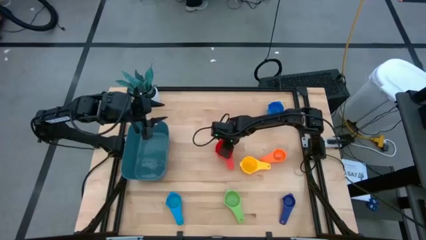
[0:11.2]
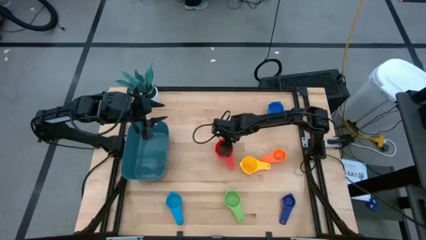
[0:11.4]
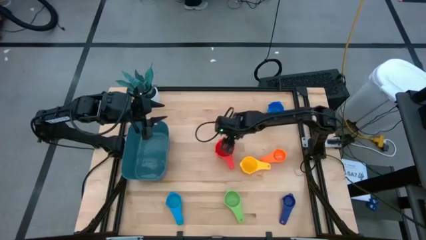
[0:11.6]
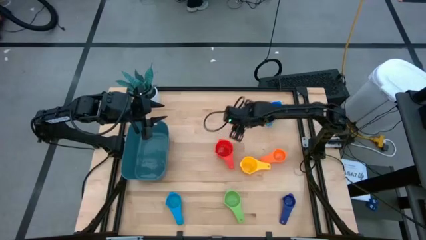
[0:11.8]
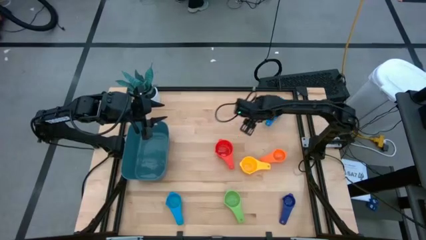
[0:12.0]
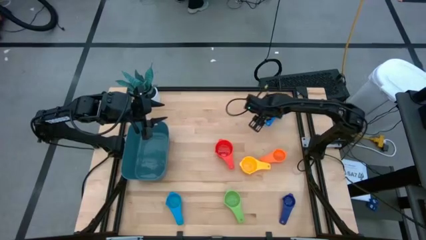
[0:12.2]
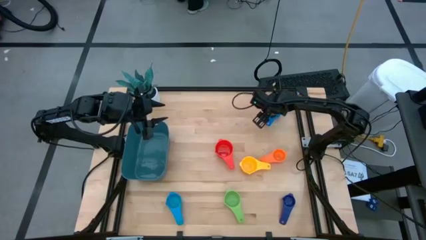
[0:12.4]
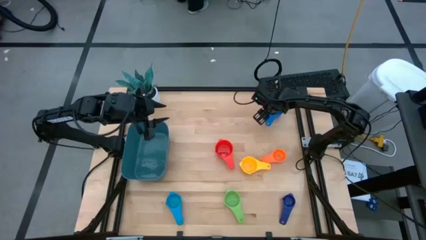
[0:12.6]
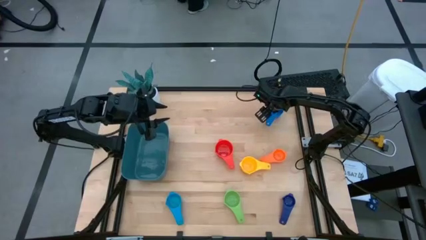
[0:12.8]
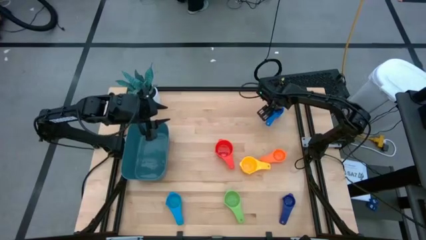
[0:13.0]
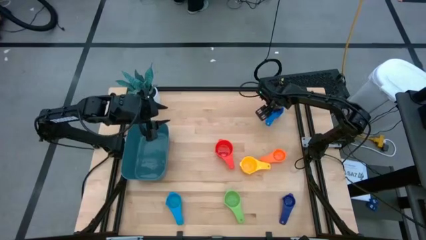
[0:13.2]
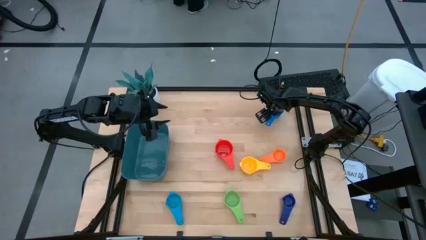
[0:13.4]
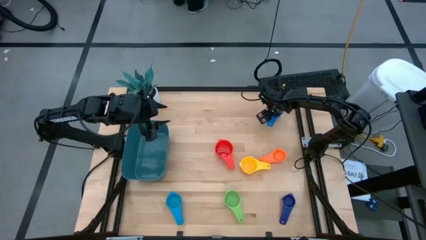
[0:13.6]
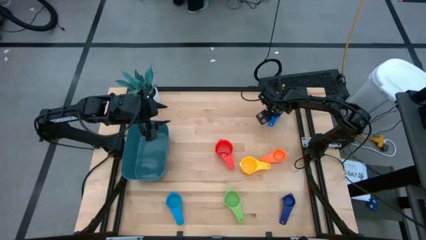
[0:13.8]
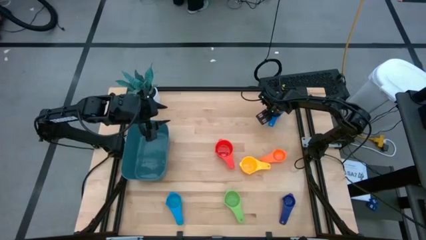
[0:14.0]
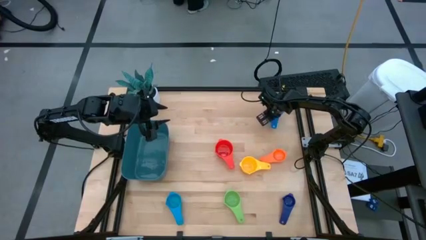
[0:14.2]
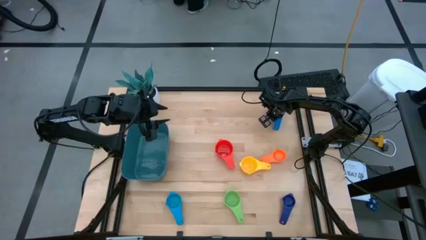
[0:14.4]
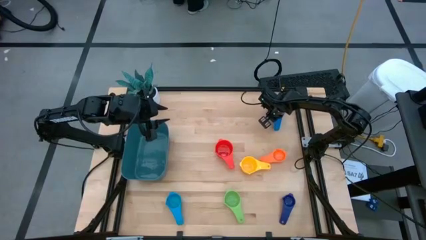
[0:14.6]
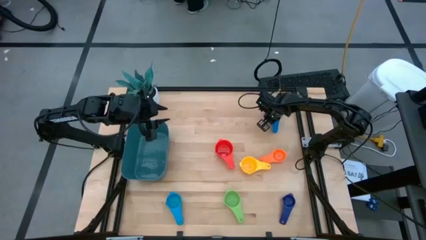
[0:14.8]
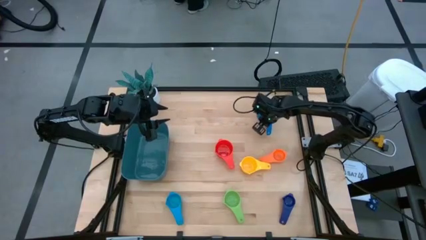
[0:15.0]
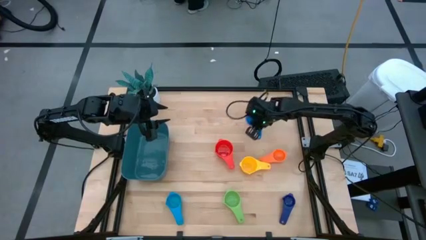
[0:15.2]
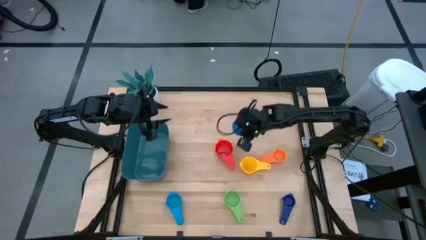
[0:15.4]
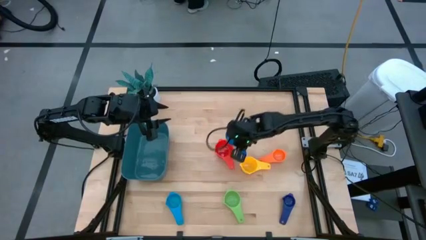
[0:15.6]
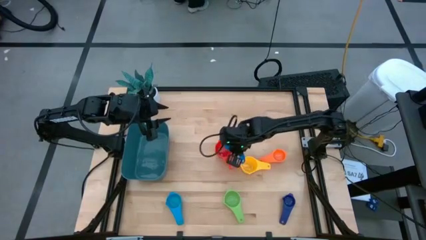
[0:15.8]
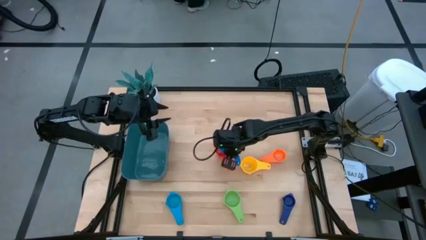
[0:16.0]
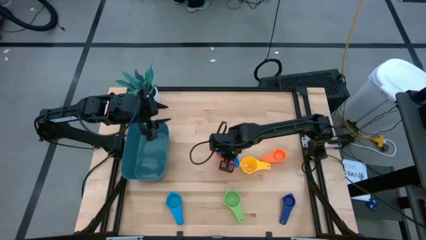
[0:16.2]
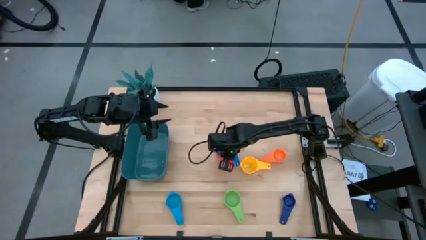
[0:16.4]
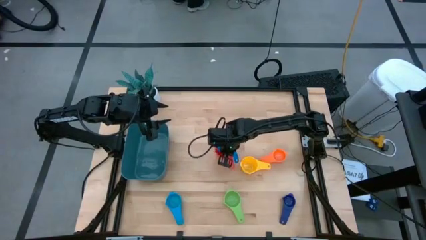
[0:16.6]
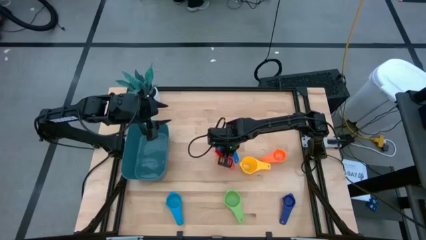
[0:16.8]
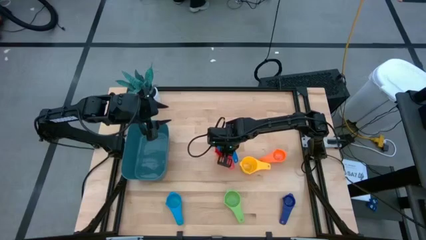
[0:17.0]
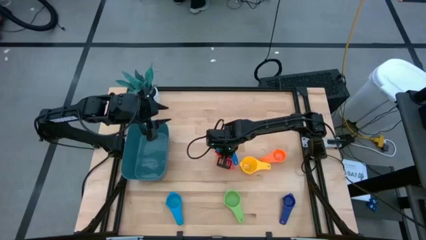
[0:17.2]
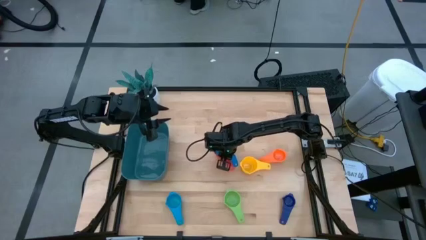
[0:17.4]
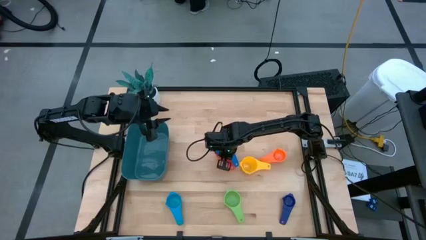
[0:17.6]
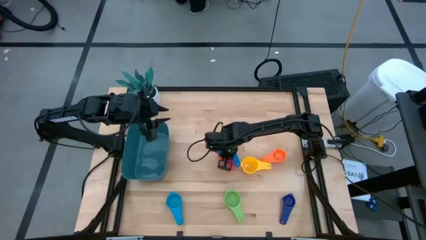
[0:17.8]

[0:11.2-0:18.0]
Task: Nest measuring cups in basket
Stack the blue measuring cup on top of the red measuring cup

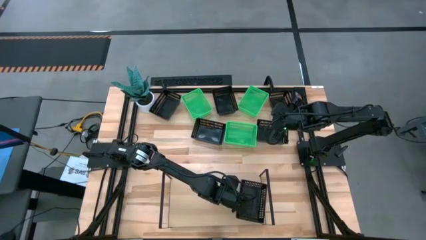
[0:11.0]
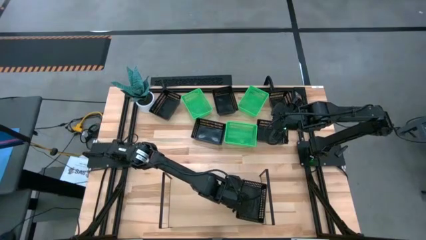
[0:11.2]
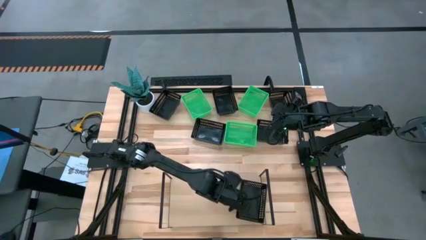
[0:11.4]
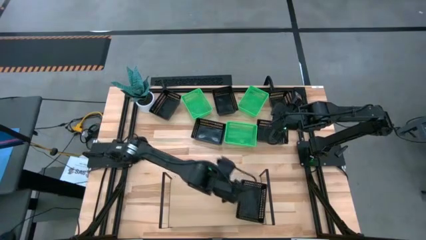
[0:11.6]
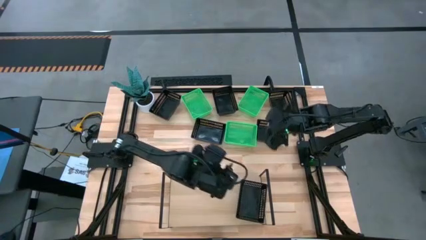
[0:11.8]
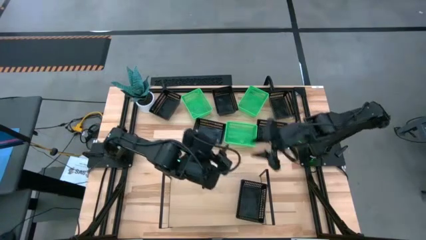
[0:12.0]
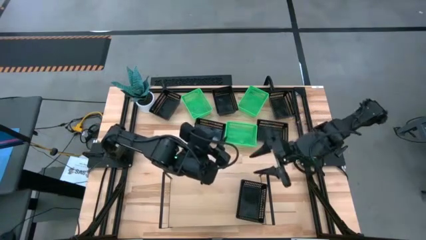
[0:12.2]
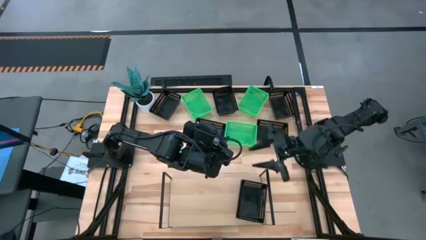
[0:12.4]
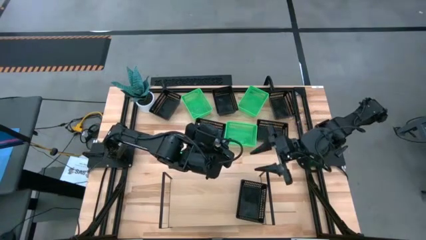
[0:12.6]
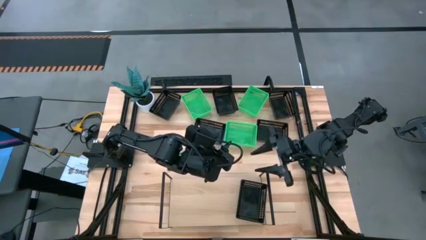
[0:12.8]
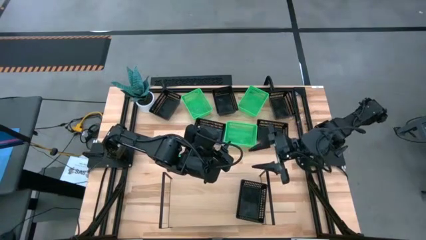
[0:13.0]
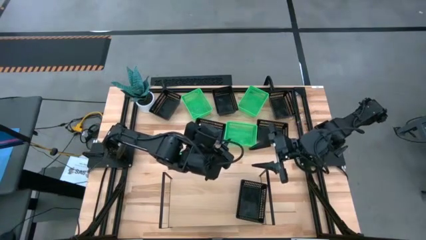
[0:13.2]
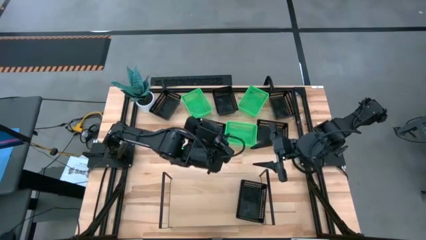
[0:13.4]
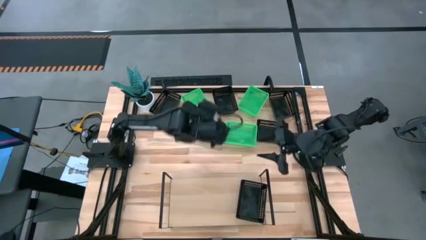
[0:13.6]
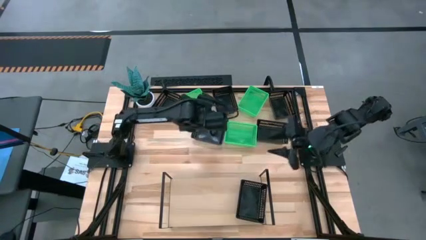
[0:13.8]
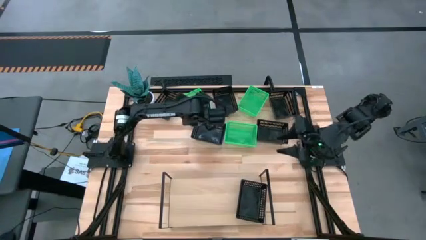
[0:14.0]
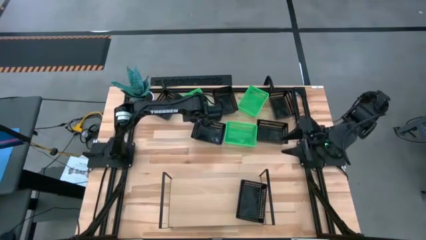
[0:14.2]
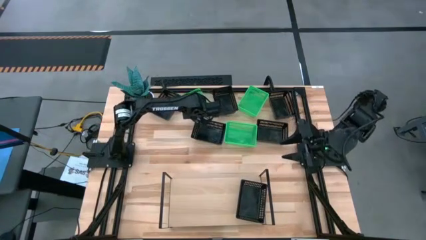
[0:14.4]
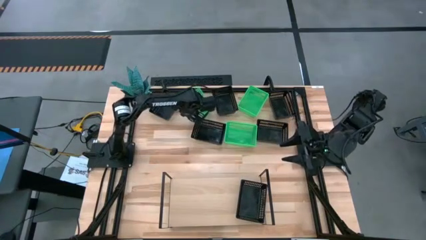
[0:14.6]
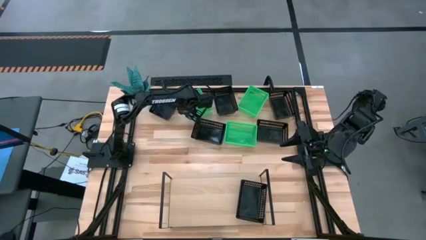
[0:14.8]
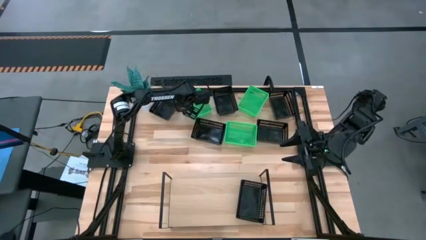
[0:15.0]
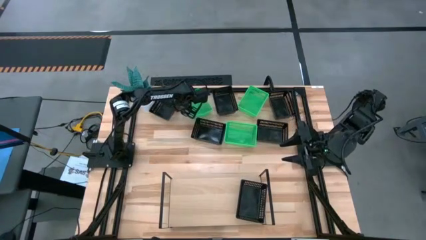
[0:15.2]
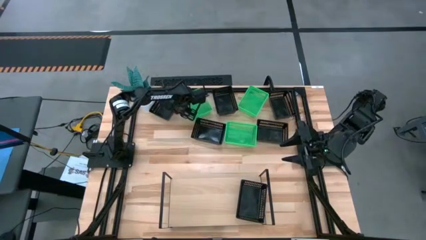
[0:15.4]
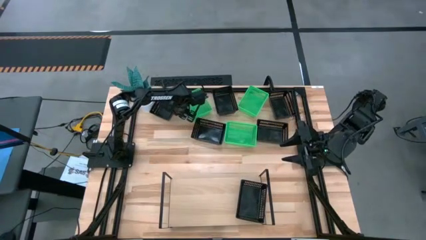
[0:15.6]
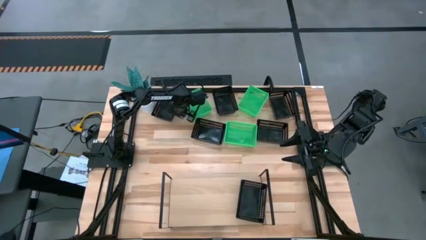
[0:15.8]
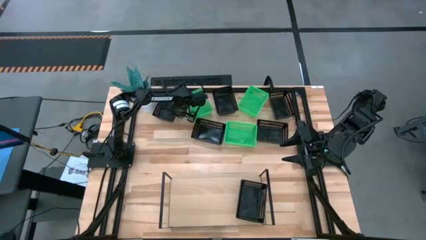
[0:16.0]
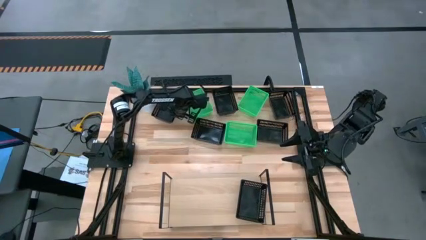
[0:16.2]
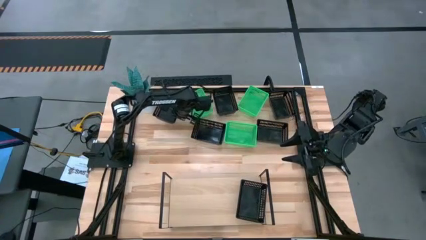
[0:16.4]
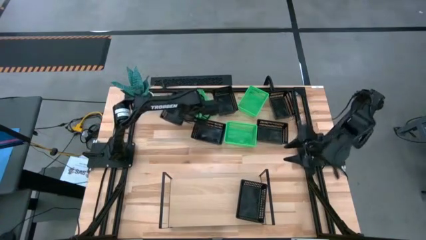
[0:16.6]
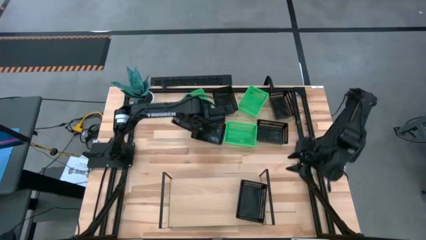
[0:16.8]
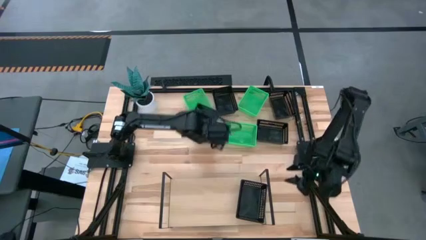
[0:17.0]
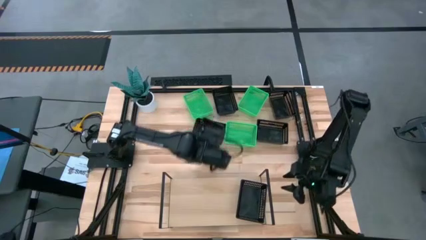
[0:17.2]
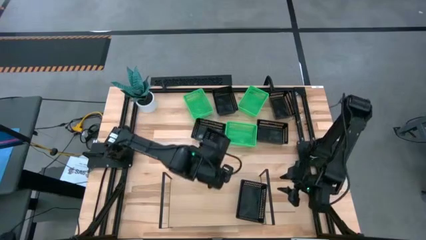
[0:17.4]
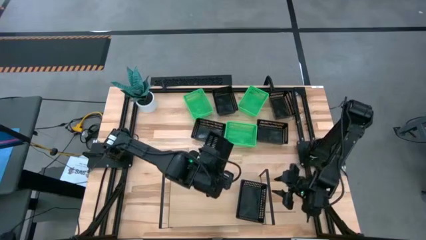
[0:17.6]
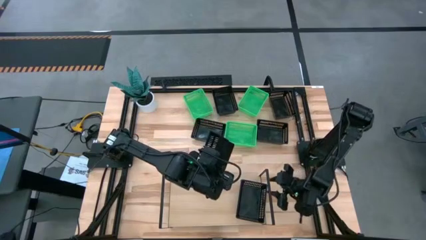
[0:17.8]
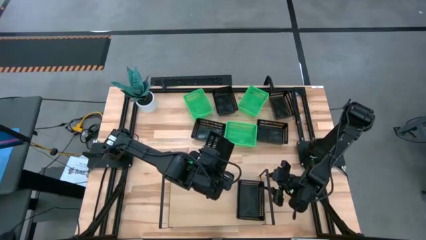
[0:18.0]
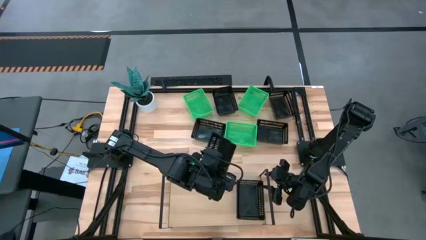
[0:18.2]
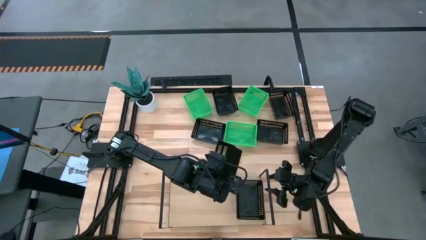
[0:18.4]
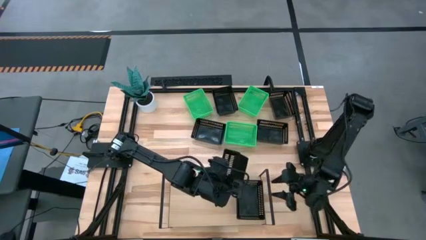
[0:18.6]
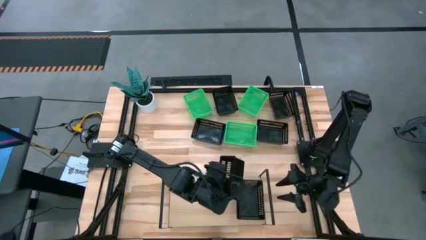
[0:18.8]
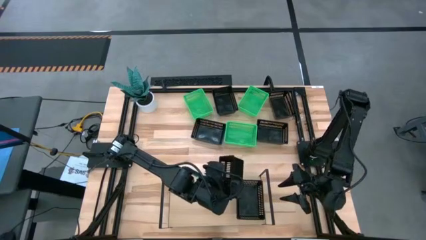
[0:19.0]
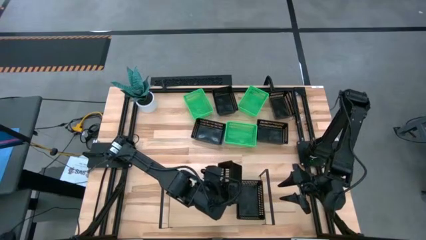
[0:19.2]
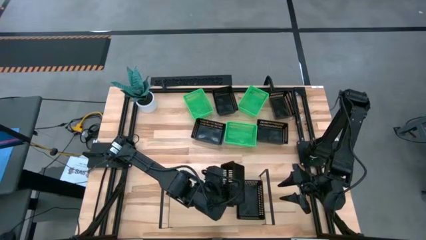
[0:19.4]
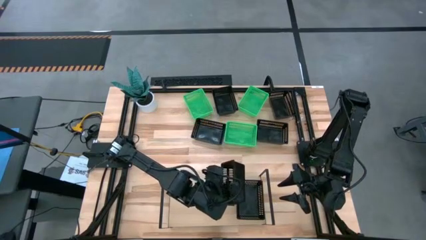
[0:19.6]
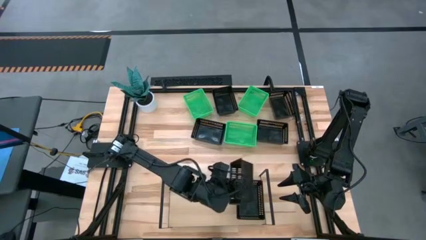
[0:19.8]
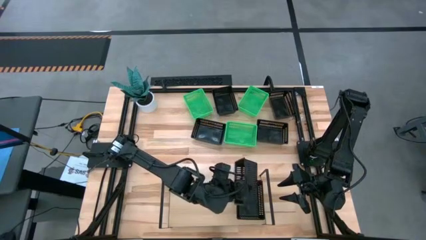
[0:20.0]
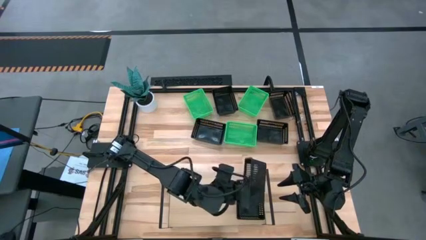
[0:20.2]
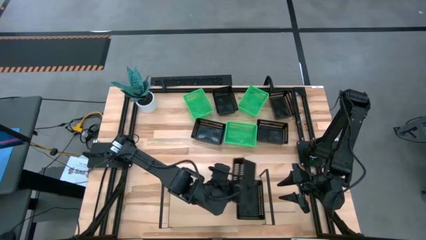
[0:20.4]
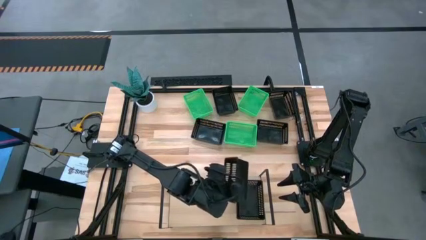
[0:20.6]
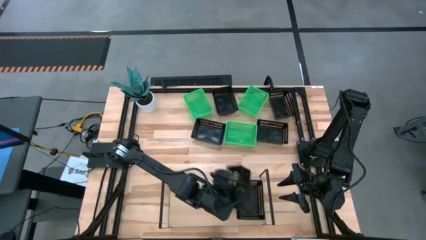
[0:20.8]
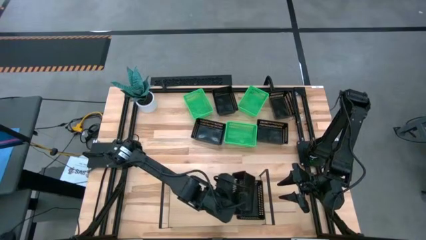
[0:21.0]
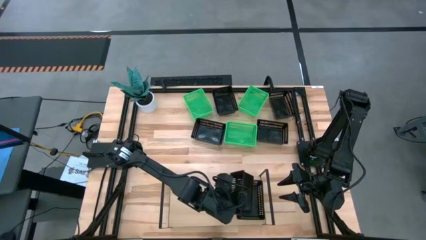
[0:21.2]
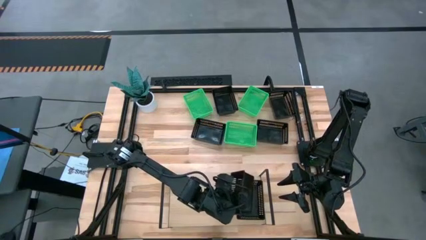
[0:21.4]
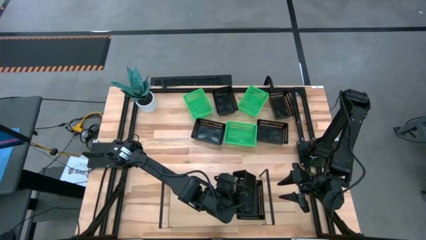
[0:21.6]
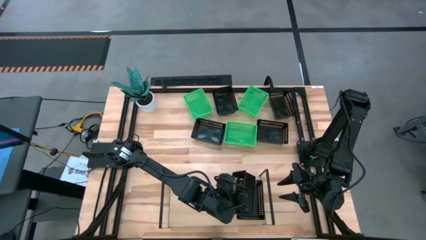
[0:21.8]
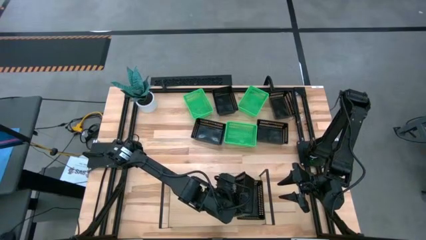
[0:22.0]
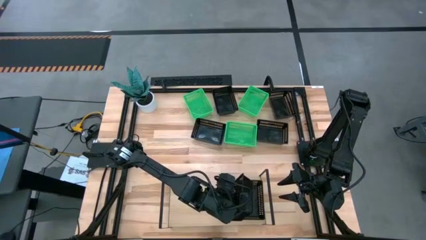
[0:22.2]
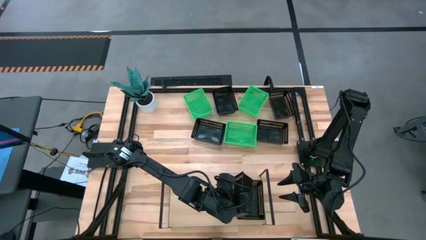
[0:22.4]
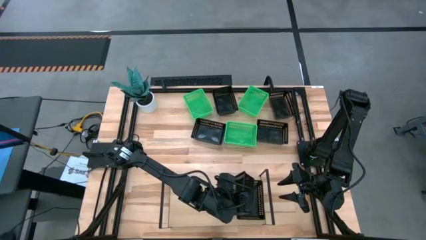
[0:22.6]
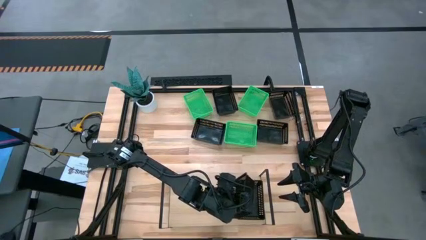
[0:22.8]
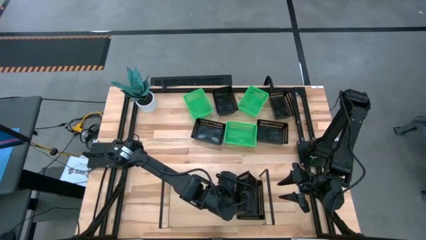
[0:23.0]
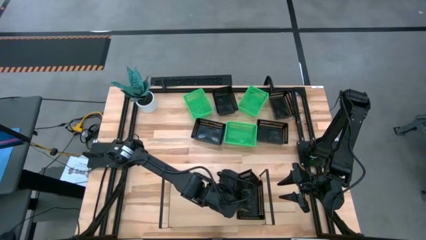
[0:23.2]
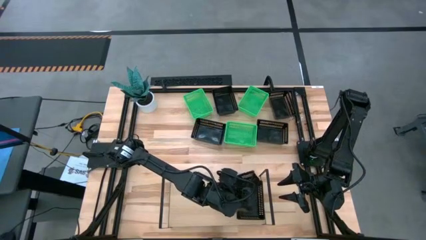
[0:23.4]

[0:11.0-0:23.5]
Task: Stack baskets on shelf by color
Stack the black bin on the black bin on the shelf
